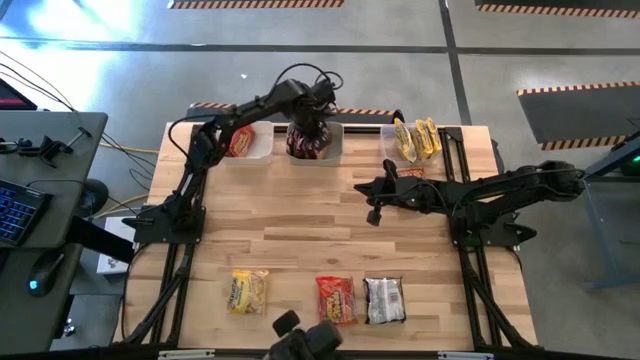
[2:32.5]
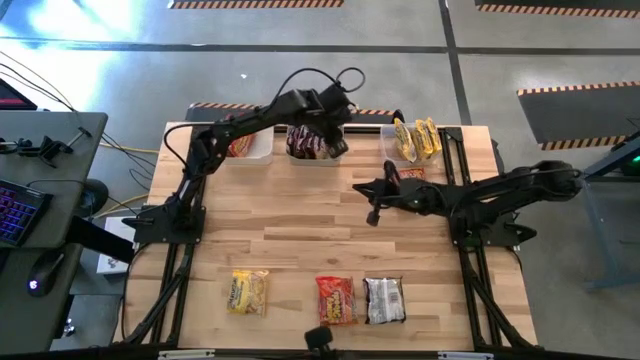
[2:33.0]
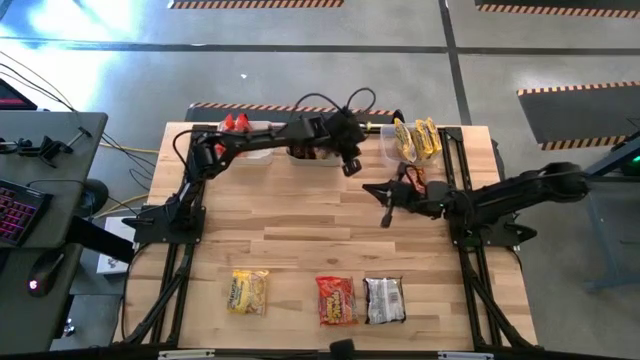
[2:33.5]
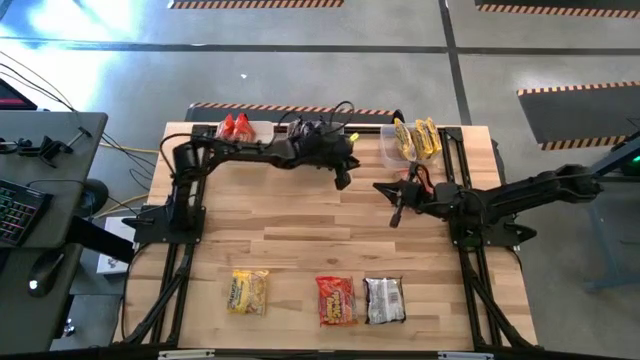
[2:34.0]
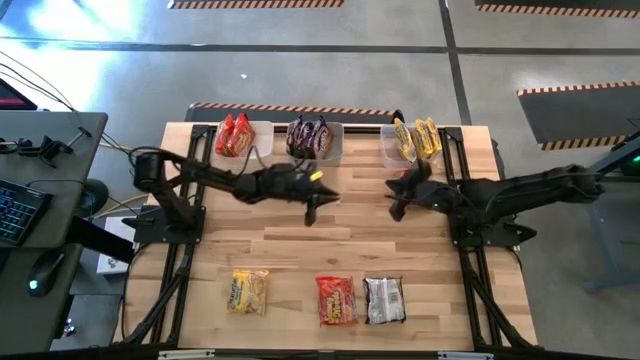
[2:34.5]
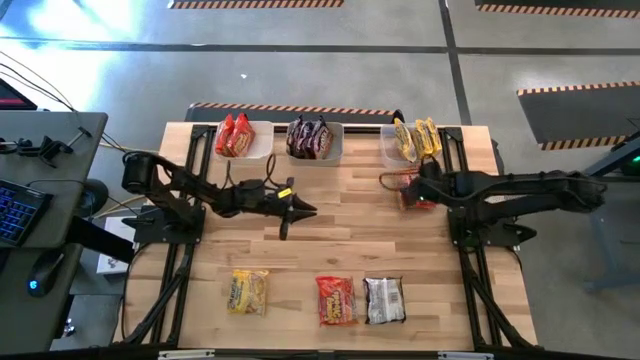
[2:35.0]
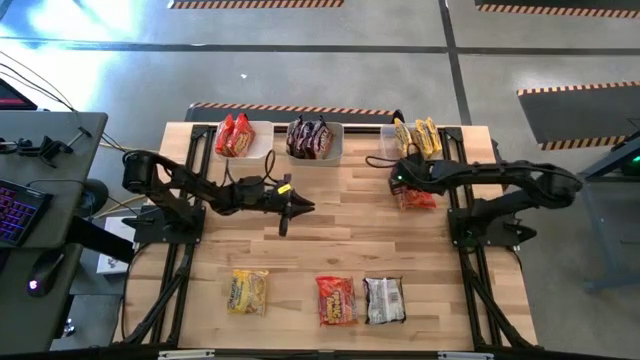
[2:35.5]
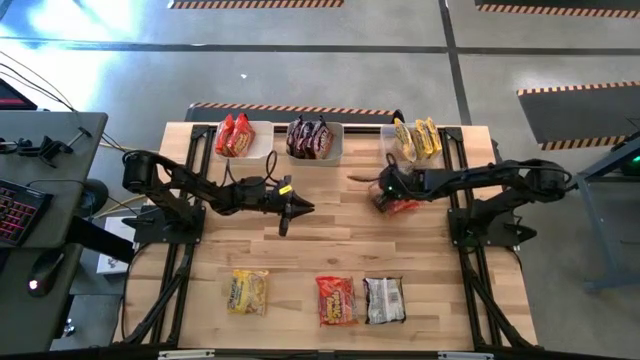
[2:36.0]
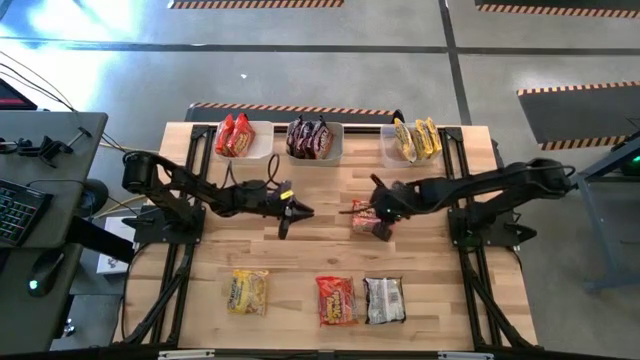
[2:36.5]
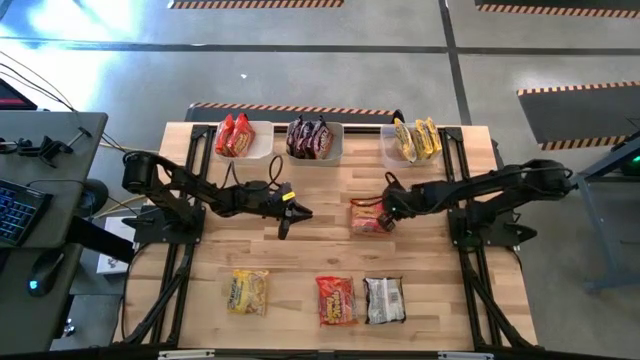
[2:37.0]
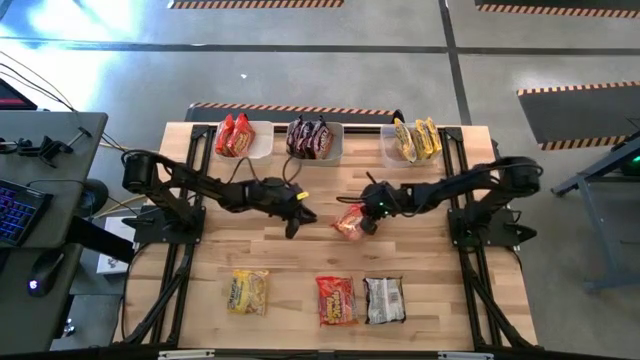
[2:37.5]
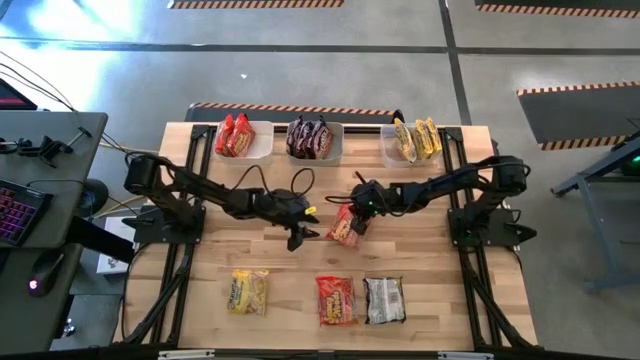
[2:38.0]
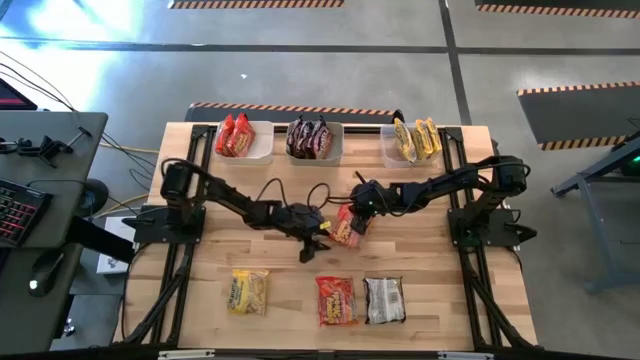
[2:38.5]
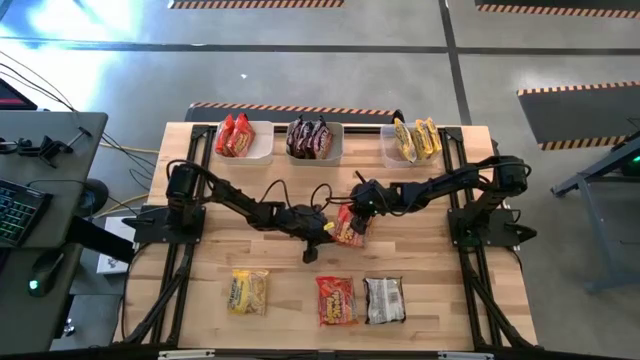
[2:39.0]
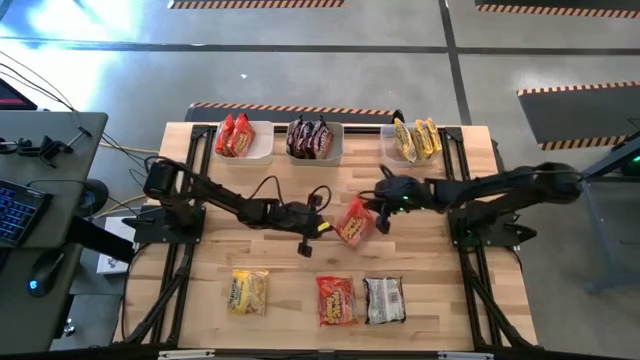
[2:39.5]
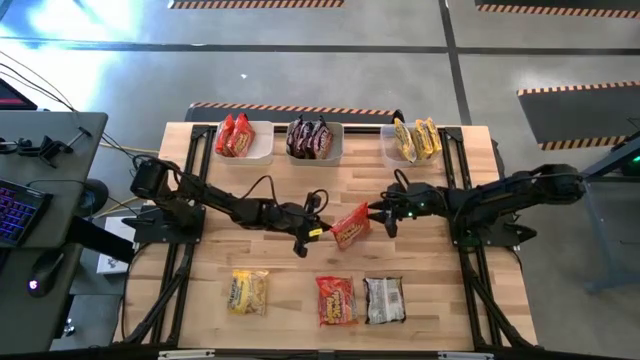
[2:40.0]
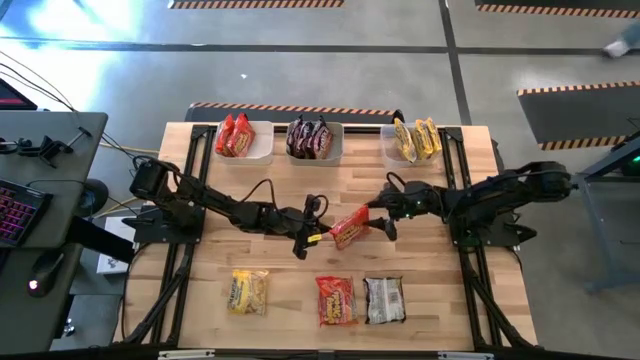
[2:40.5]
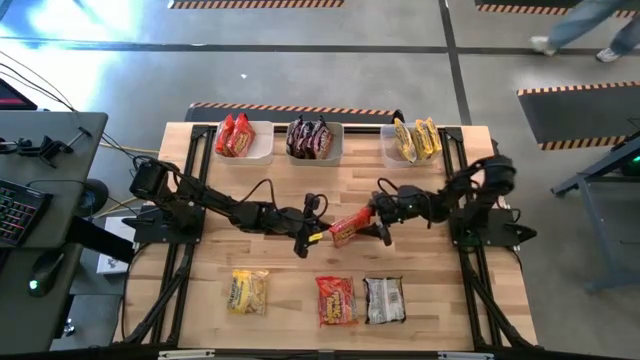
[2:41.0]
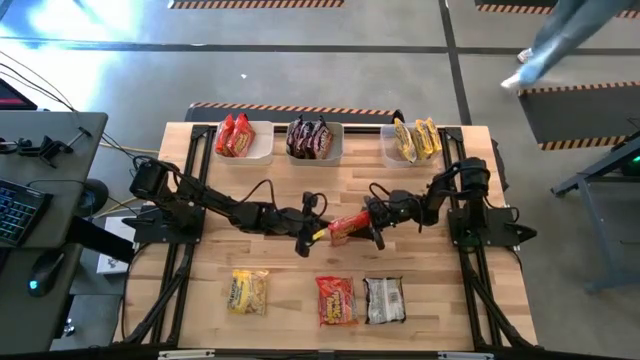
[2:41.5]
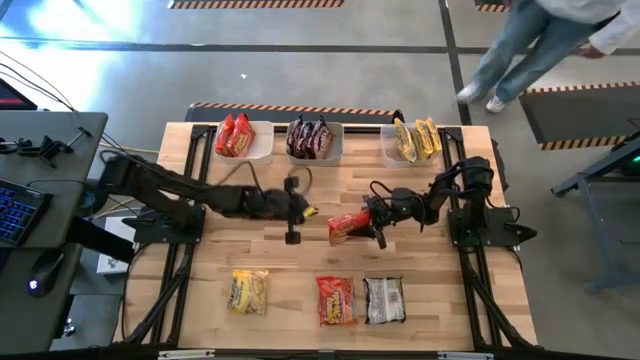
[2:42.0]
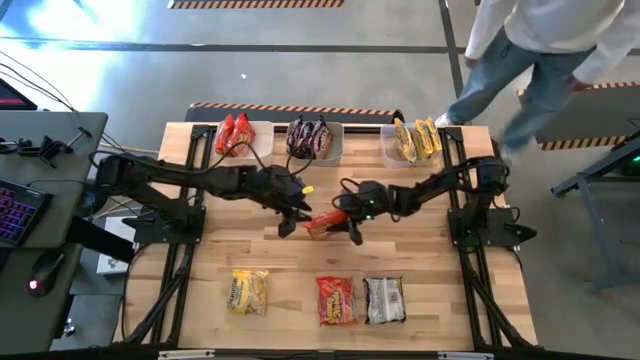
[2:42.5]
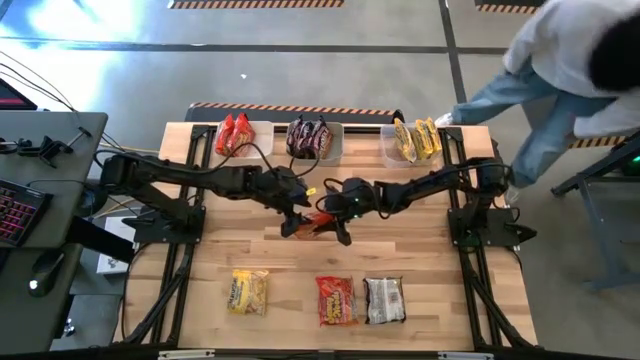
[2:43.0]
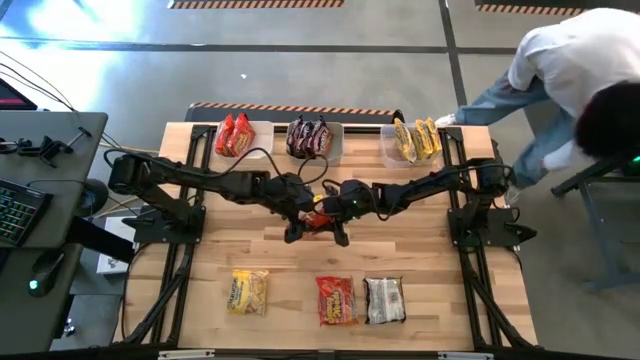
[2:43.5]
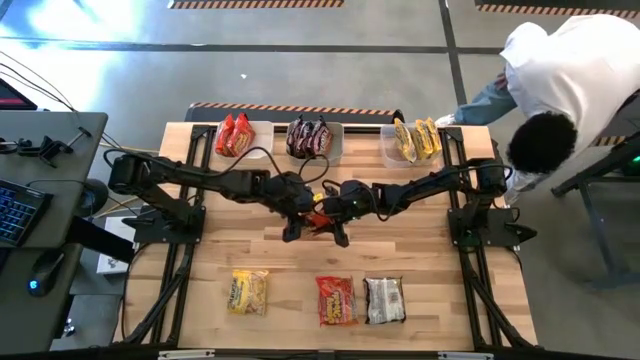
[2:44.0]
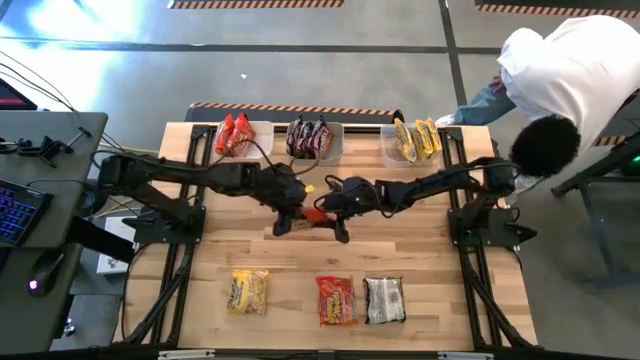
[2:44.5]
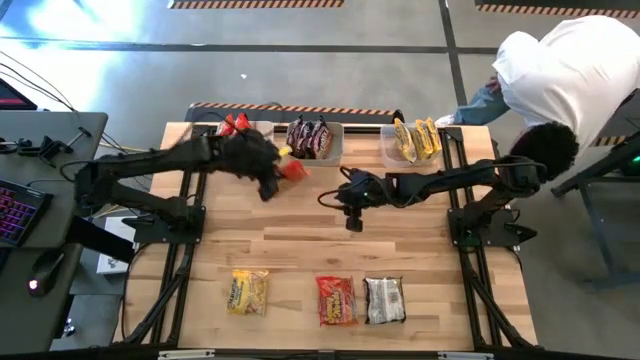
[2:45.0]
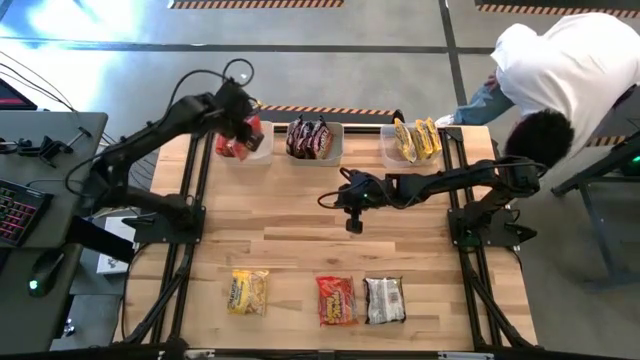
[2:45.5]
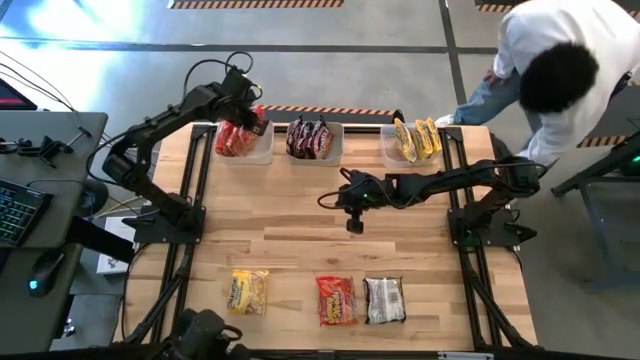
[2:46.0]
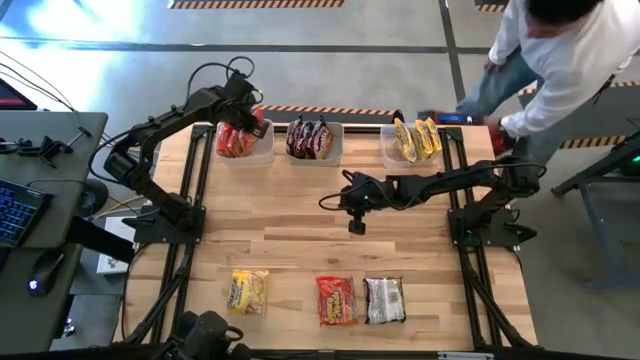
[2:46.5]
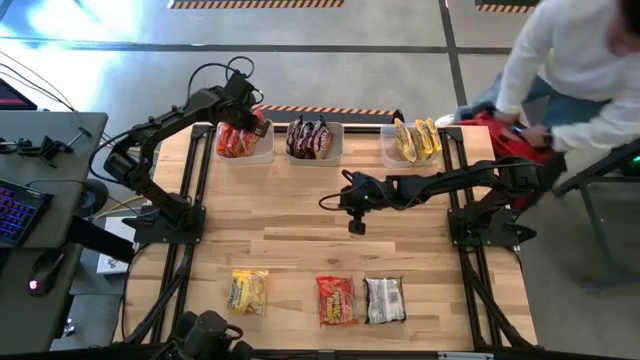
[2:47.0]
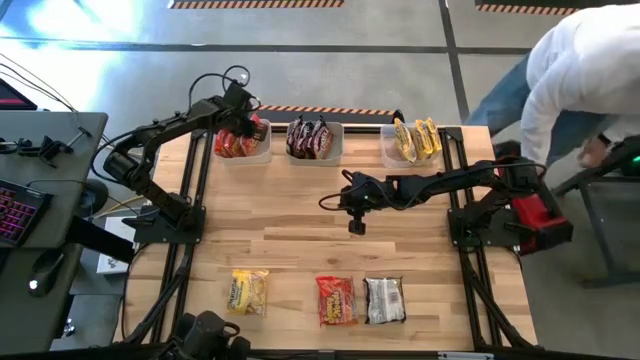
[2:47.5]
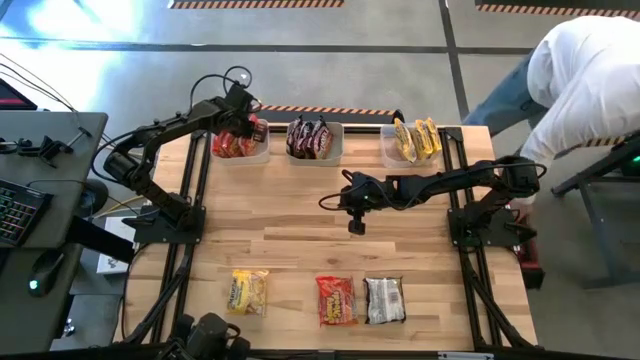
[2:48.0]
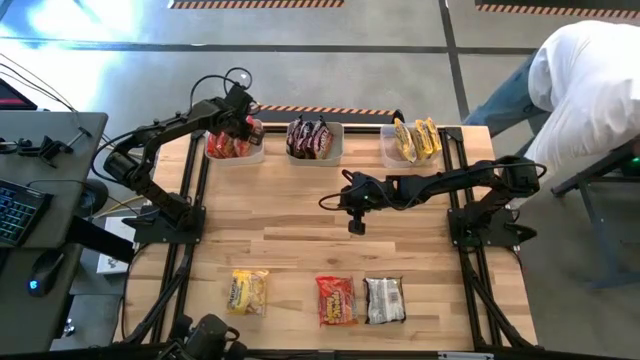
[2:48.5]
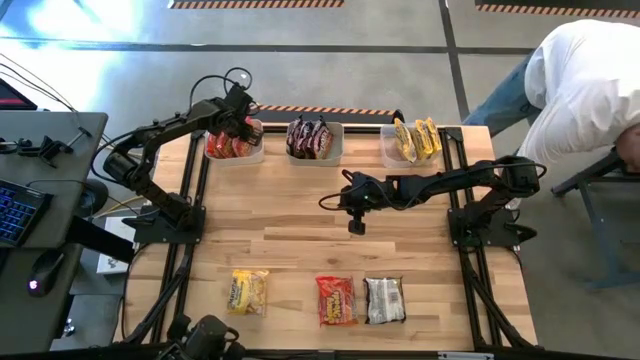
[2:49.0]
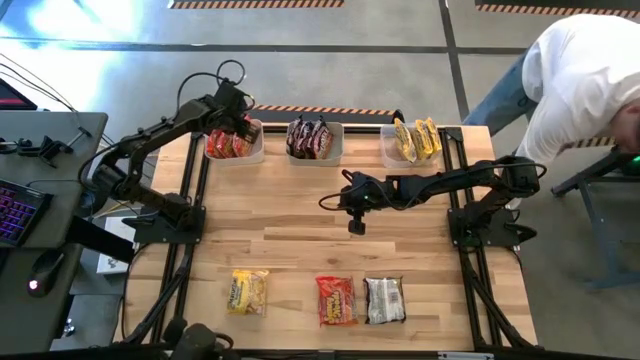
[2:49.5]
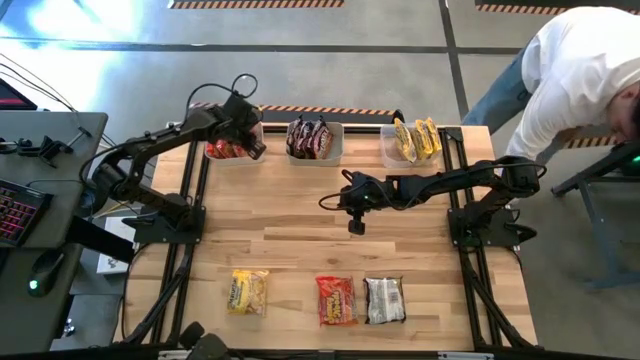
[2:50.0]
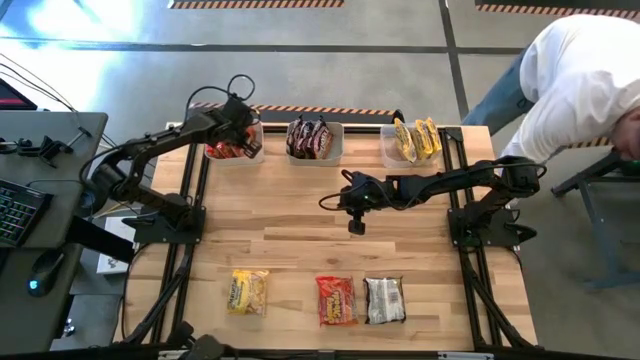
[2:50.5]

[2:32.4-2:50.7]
Task: Sort Maruchan noodles
Put the orange noodle pack into the white bin

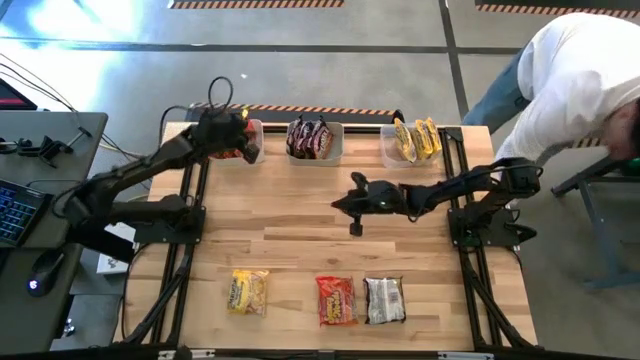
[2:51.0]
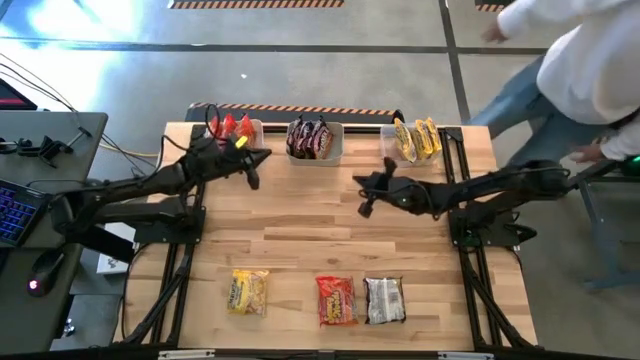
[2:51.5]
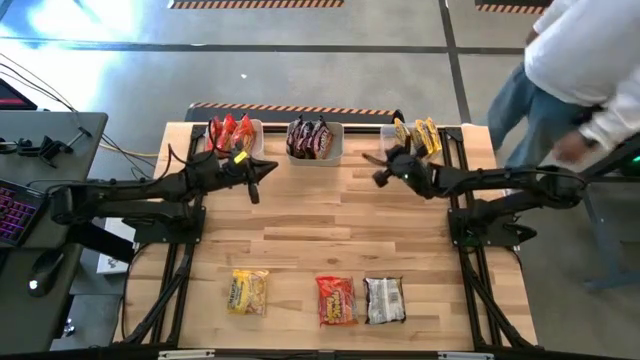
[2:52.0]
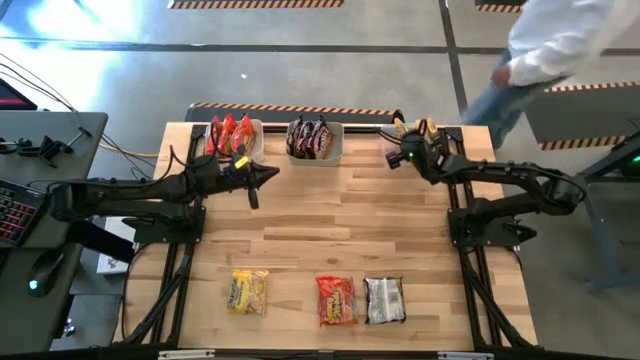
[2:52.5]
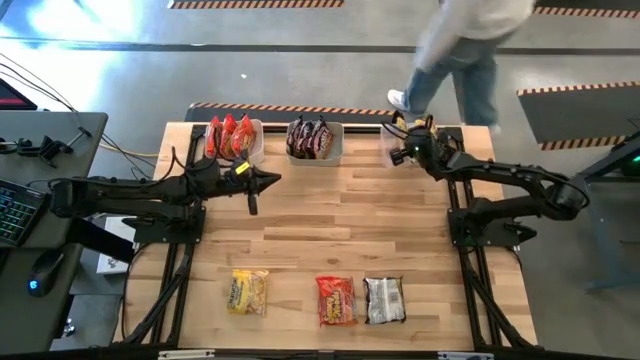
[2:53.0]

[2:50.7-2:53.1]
Adjust the yellow noodle pack

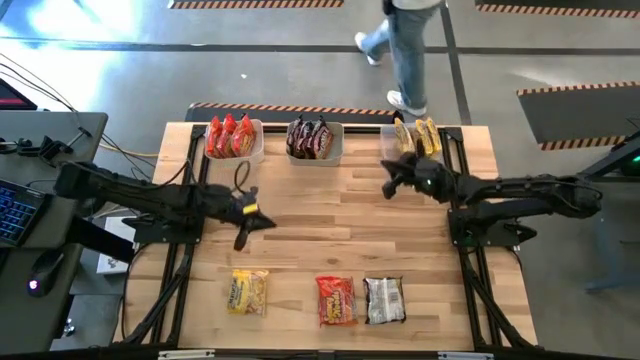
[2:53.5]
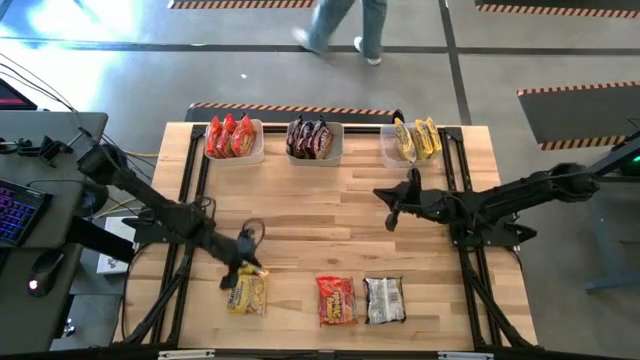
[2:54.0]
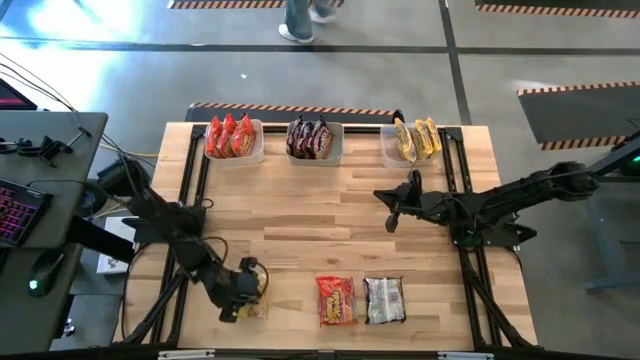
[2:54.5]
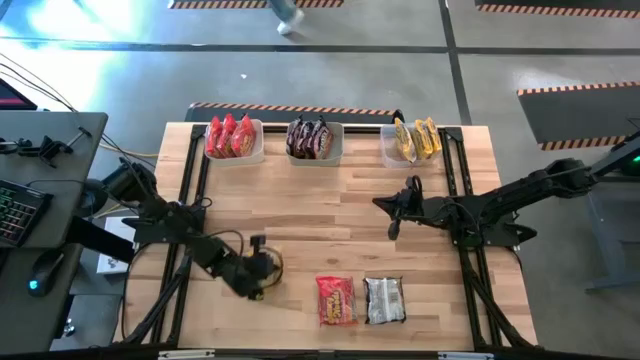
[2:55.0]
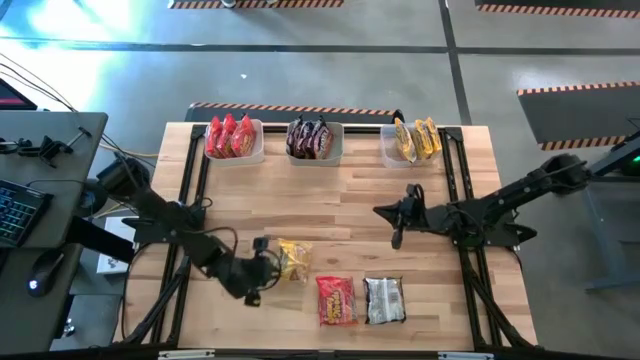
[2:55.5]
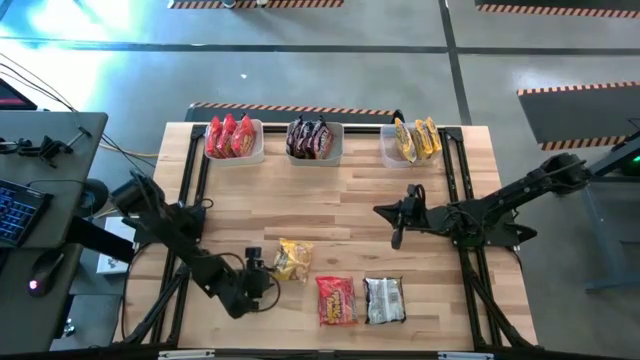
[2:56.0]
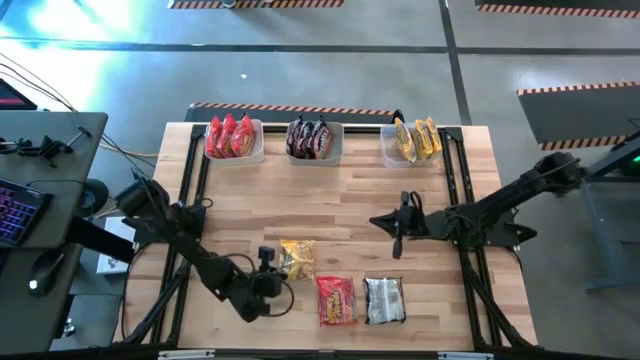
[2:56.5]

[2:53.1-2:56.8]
Put the yellow noodle pack into the transparent bin
